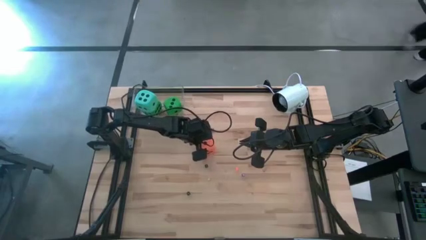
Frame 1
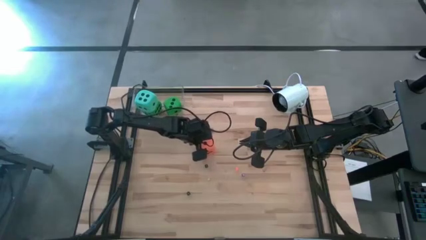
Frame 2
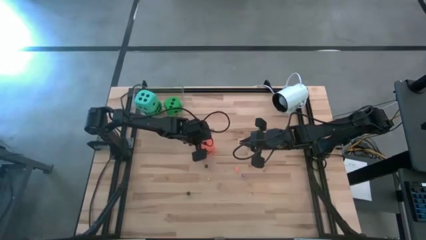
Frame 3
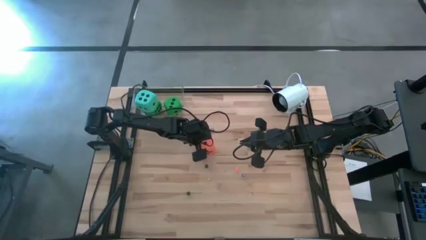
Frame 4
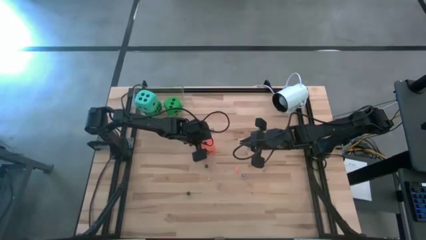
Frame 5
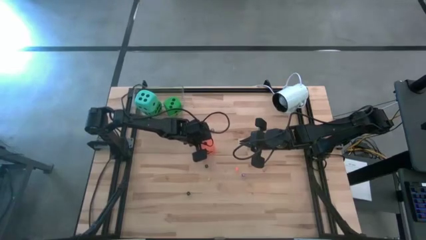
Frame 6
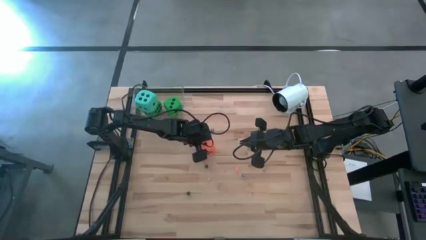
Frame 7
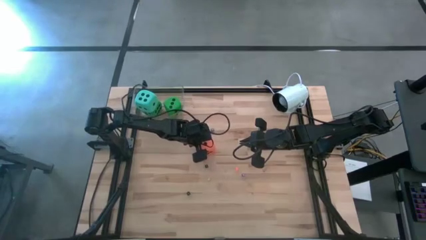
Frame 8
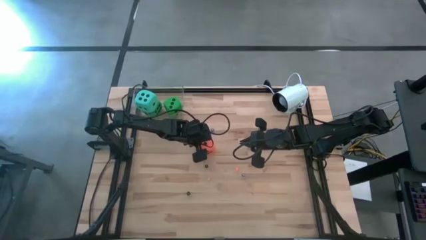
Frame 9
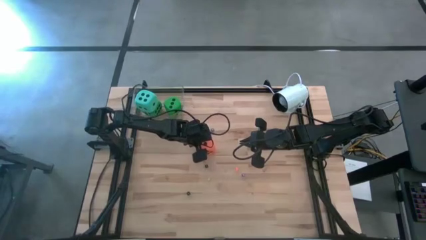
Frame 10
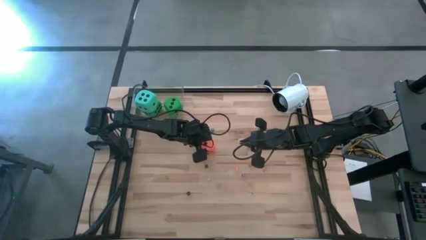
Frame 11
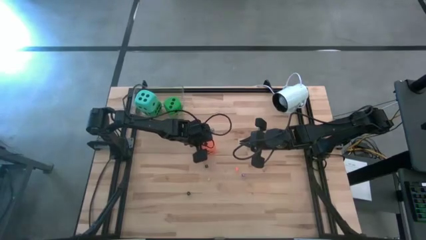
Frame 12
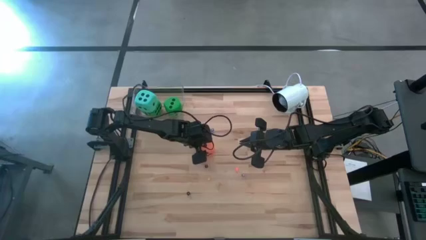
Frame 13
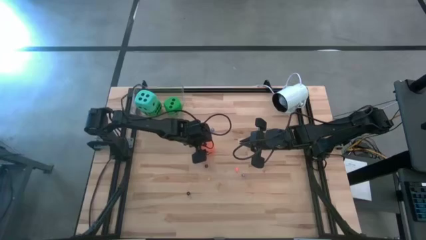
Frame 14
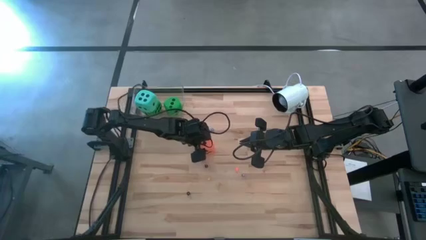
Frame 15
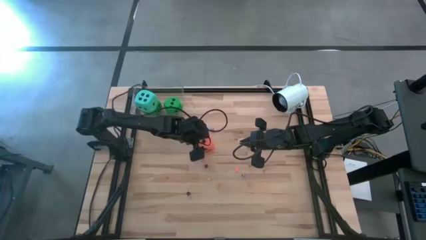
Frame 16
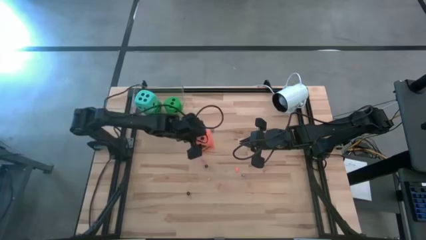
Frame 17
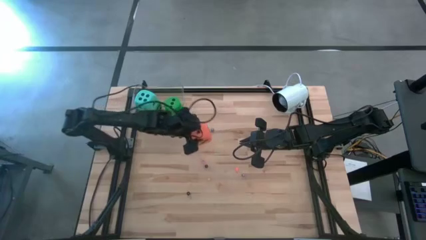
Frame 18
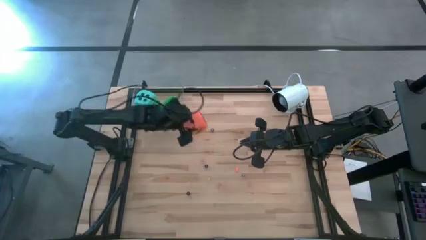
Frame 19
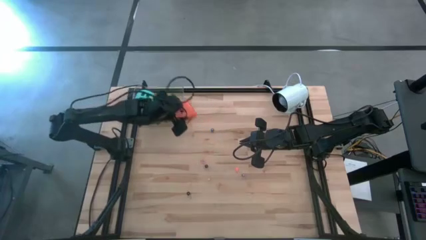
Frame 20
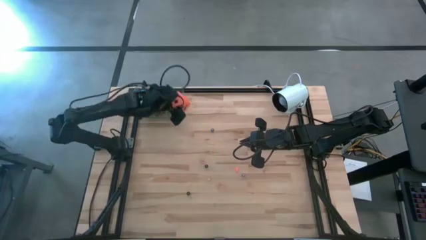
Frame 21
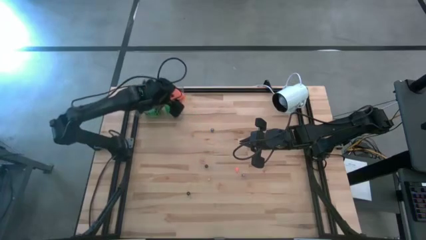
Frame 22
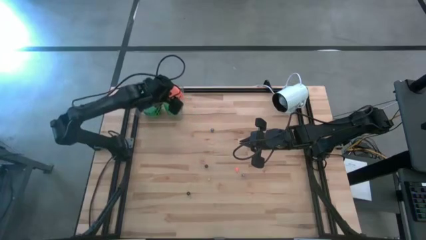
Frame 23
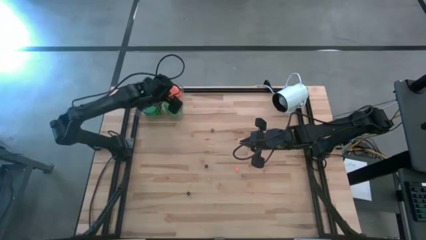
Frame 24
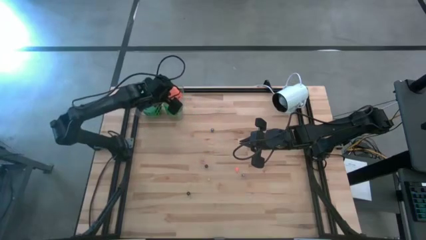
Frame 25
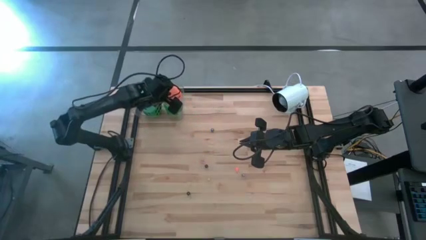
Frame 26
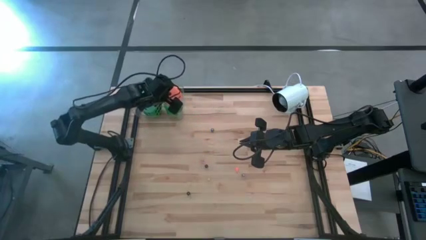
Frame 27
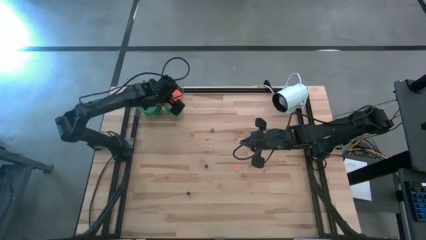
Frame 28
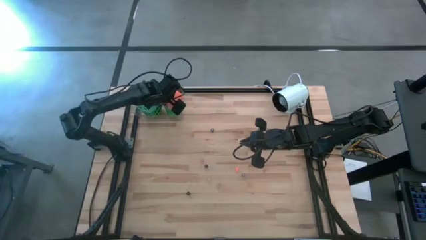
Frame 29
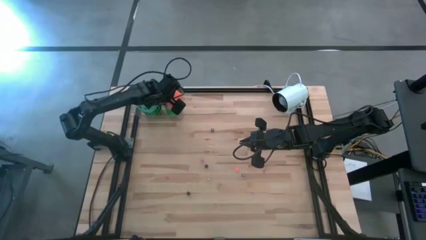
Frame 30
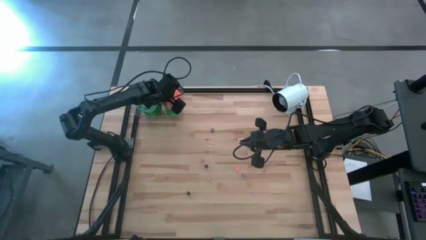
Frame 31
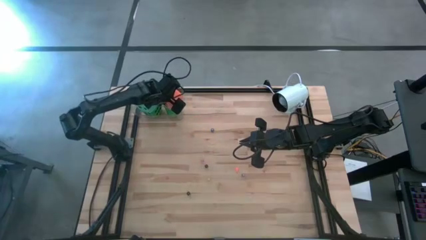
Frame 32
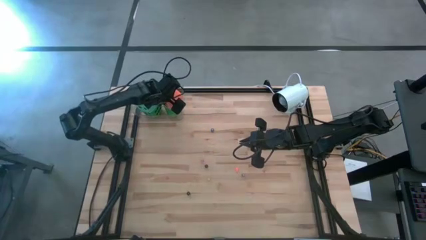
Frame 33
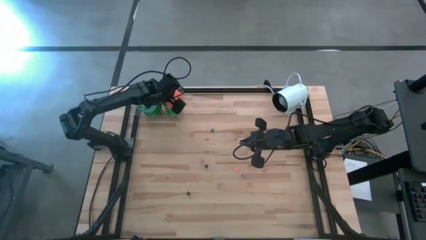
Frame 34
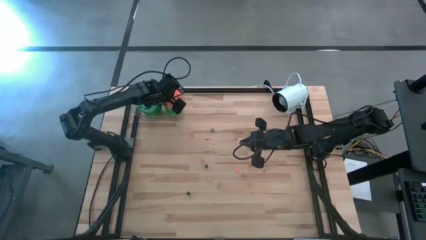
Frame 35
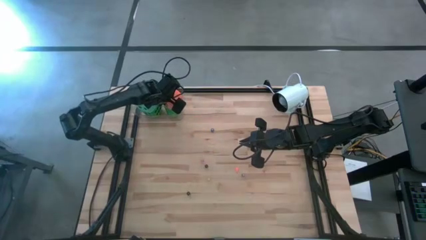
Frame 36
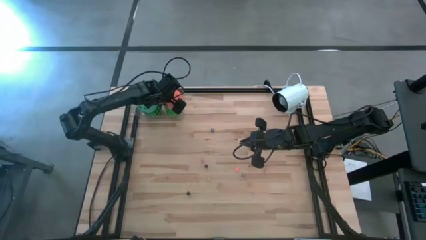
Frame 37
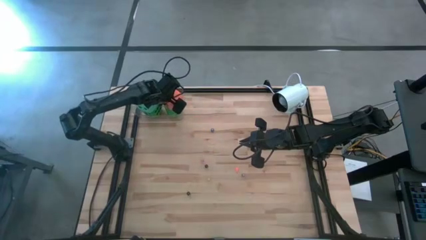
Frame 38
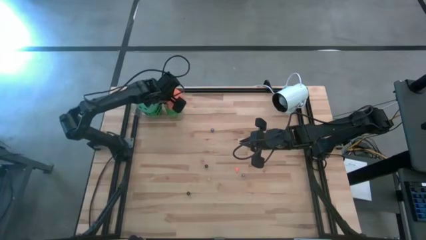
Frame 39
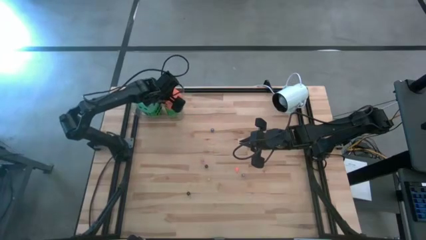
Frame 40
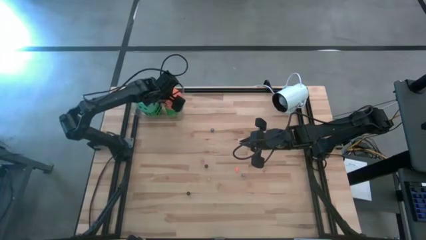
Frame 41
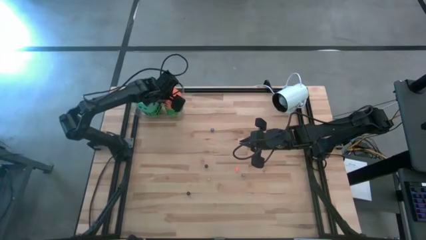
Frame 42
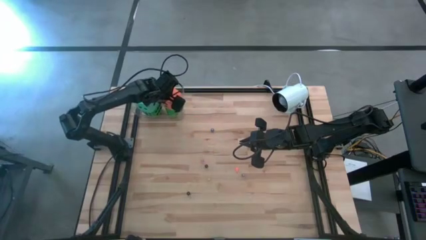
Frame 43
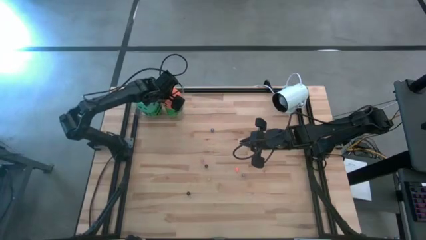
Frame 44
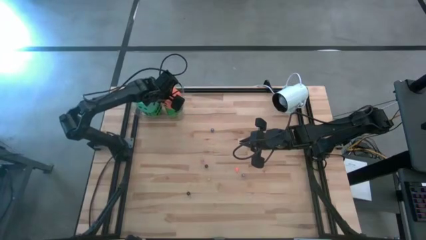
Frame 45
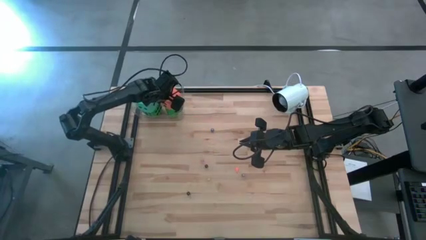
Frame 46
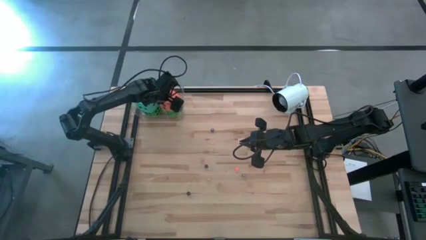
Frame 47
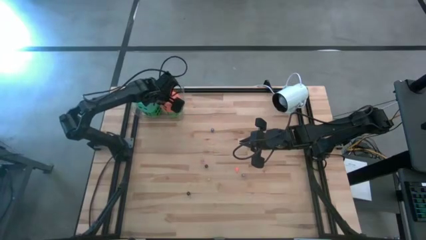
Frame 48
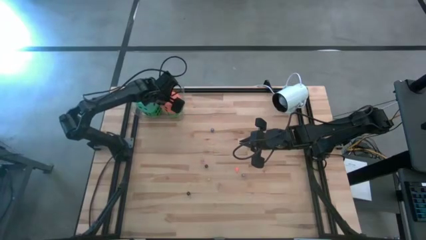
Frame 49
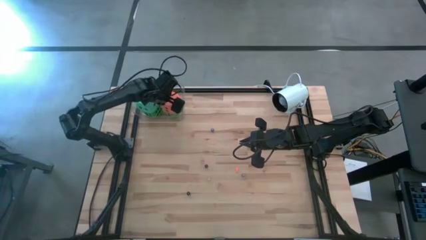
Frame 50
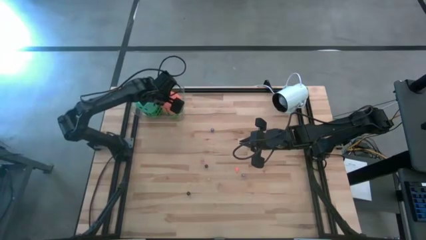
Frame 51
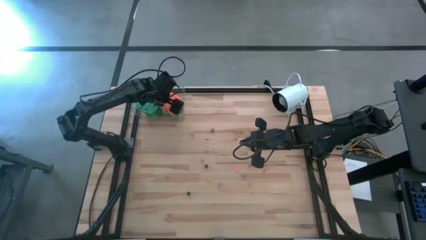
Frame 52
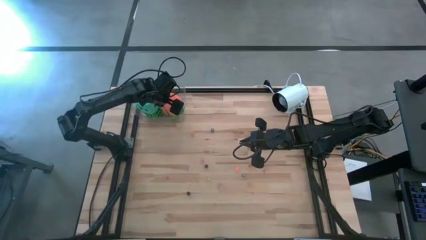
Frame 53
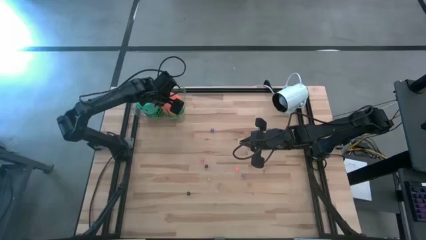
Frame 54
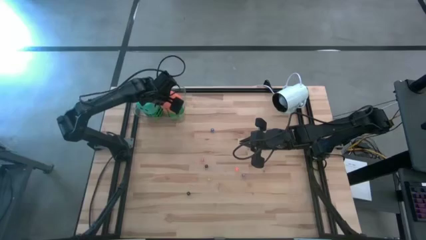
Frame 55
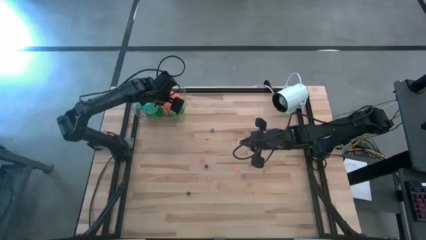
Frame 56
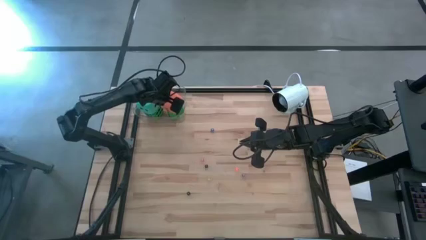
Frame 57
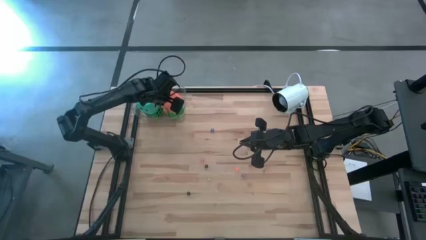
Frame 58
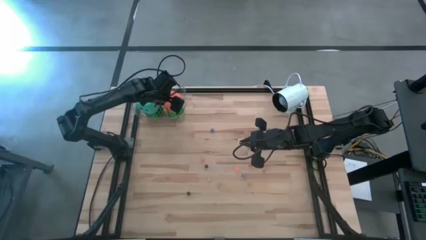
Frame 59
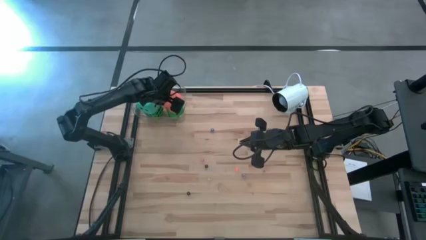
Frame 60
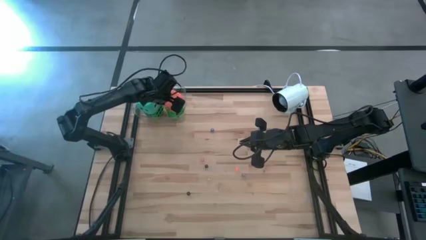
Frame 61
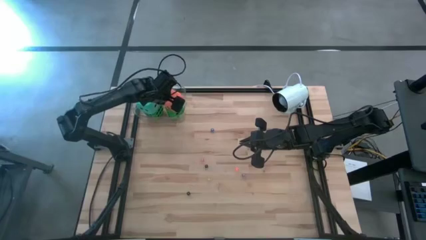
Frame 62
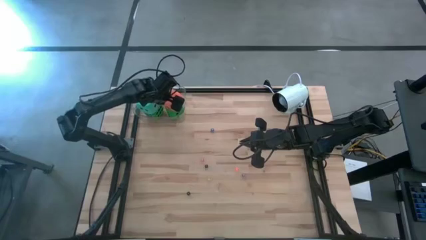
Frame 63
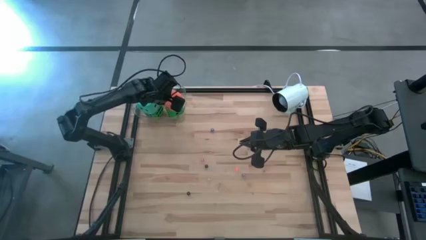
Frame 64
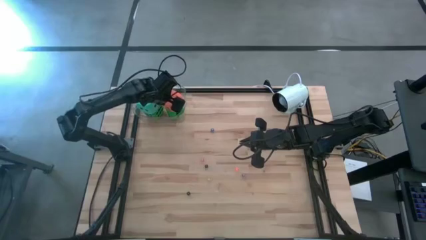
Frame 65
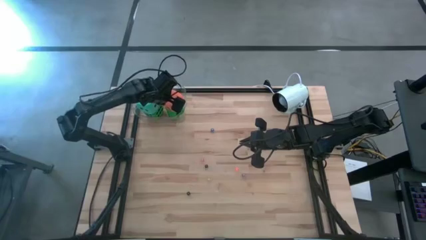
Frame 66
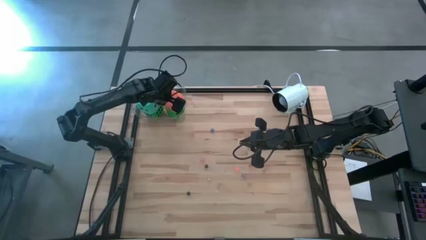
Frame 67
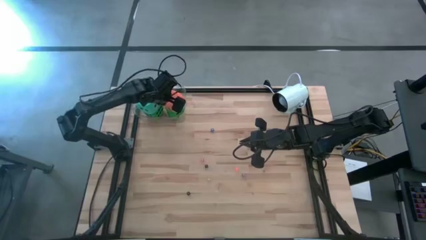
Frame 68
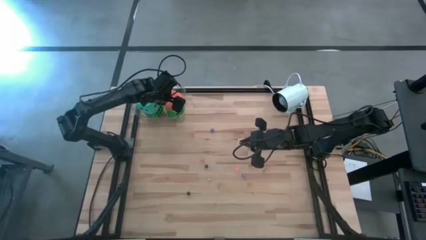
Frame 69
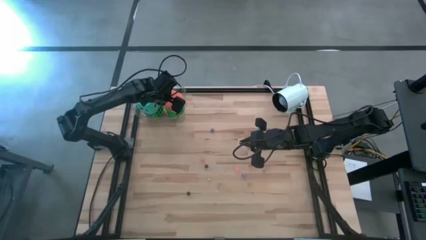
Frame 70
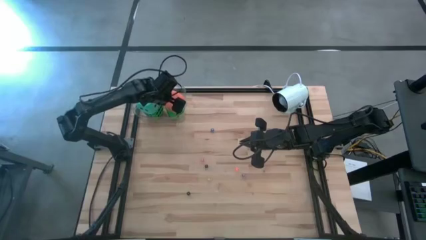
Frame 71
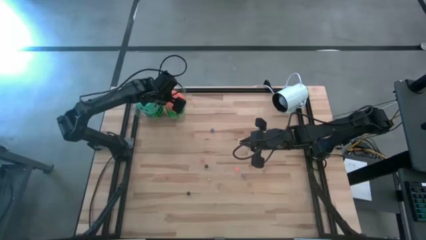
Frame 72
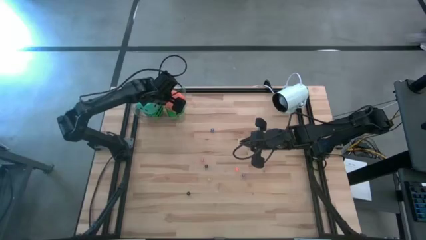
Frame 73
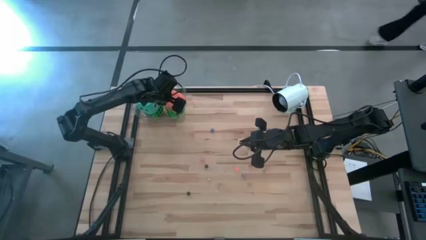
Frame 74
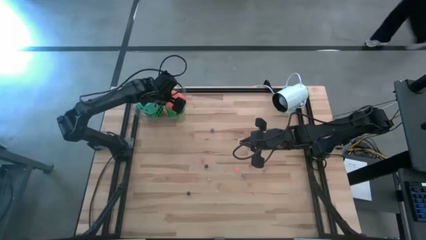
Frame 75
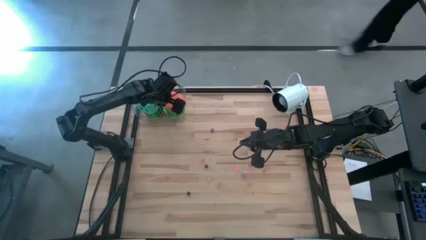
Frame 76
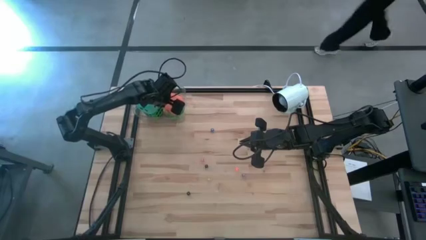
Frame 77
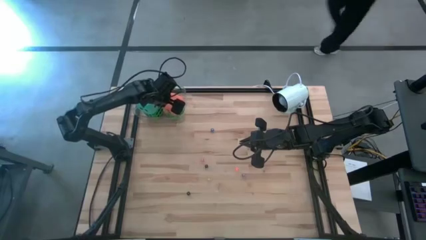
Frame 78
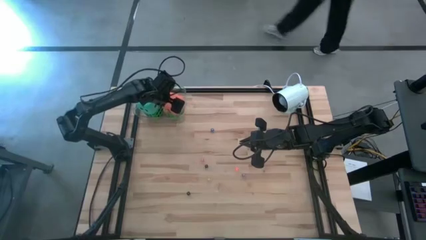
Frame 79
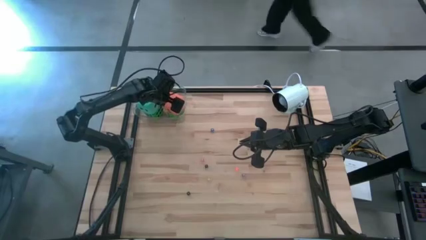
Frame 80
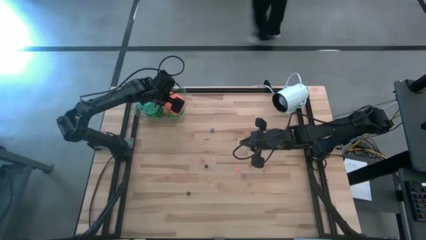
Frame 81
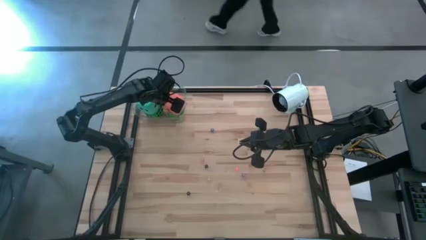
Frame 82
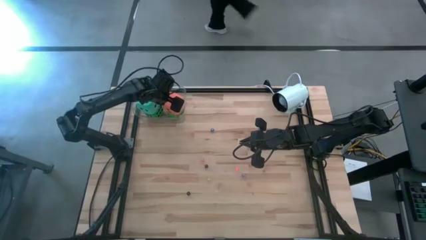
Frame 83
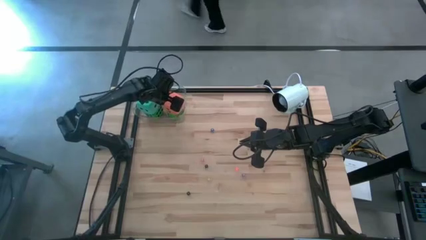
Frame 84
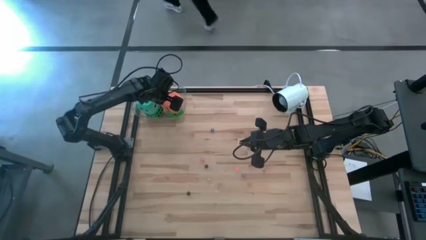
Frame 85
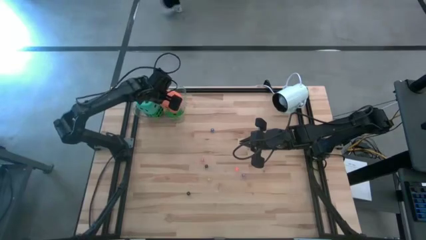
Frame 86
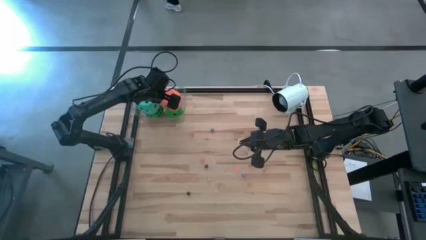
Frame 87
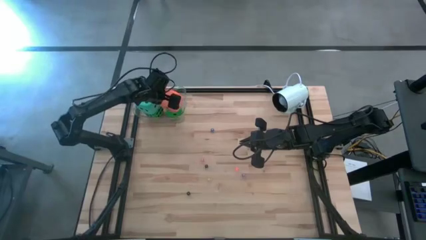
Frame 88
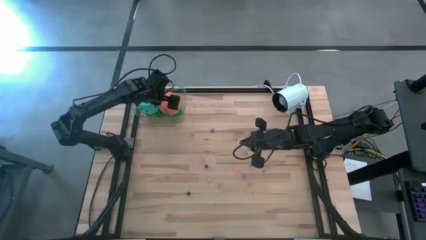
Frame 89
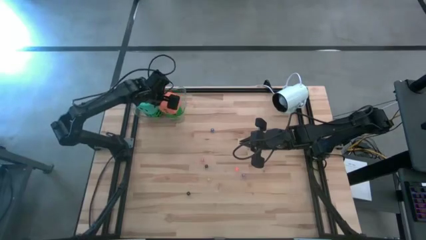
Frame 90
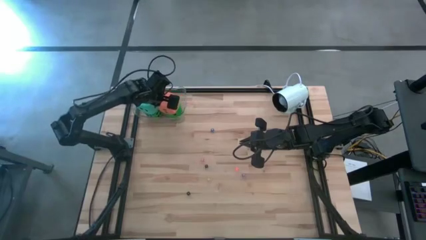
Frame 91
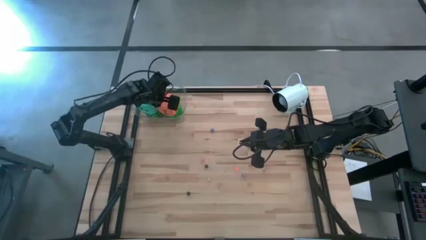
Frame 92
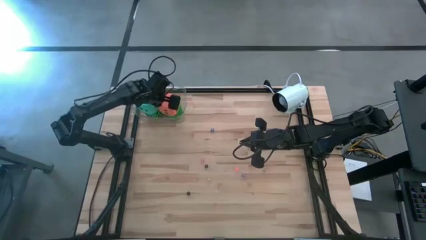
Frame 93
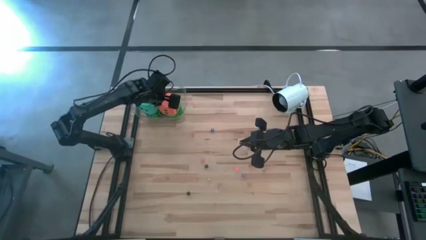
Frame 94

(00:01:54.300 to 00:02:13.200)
Task: Pick & Place Dice
Put the large orange die into the transparent bin
